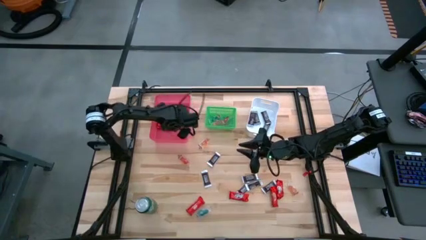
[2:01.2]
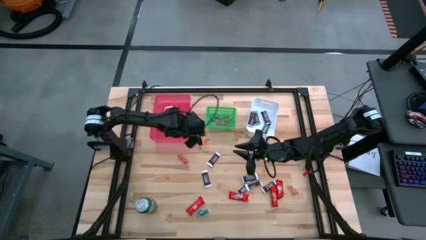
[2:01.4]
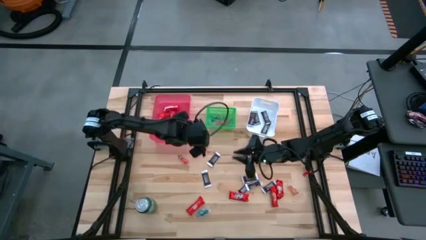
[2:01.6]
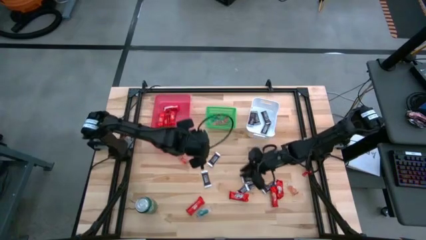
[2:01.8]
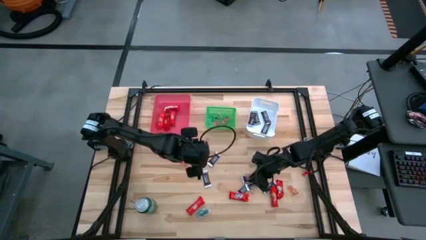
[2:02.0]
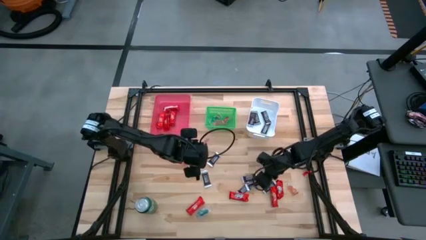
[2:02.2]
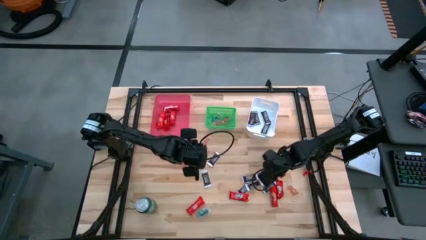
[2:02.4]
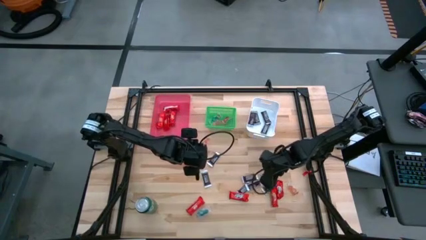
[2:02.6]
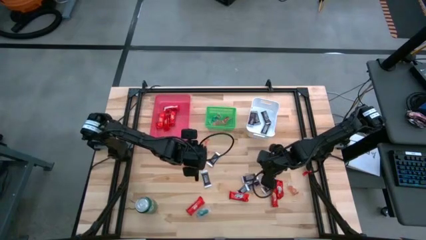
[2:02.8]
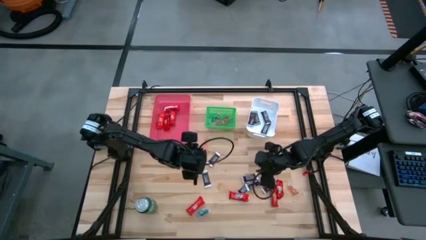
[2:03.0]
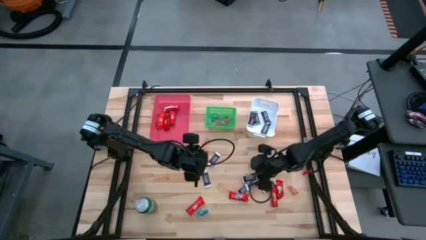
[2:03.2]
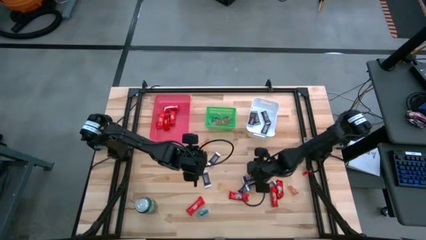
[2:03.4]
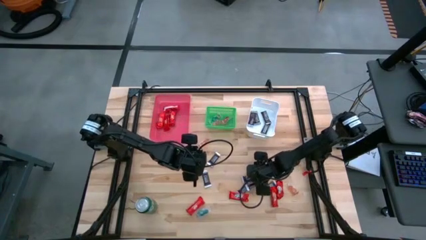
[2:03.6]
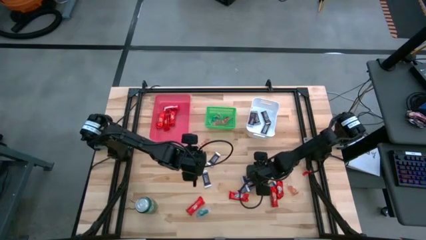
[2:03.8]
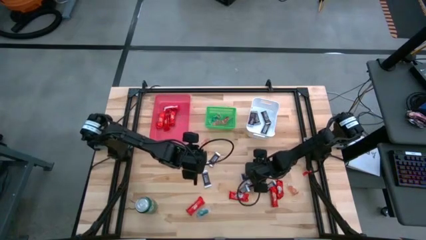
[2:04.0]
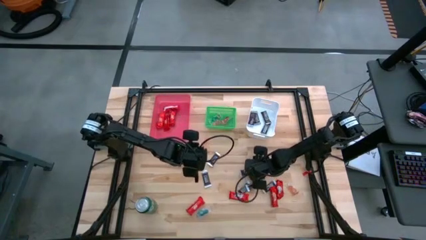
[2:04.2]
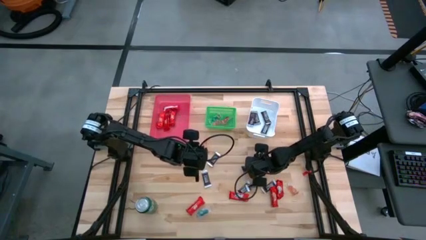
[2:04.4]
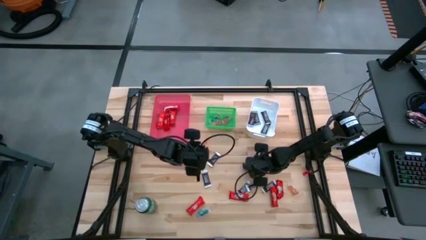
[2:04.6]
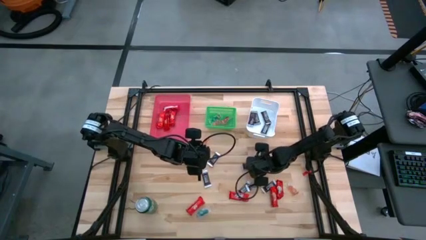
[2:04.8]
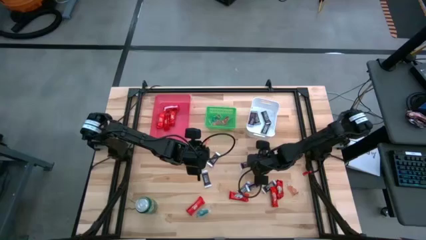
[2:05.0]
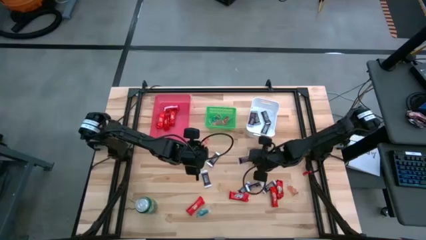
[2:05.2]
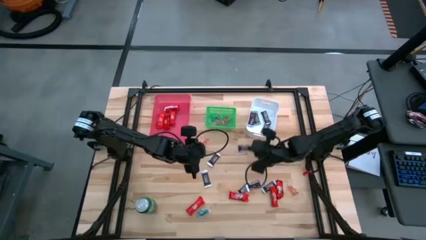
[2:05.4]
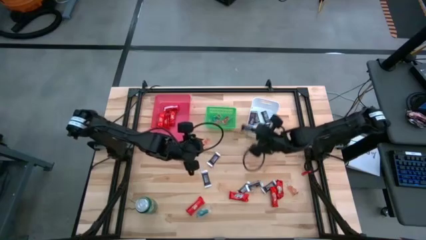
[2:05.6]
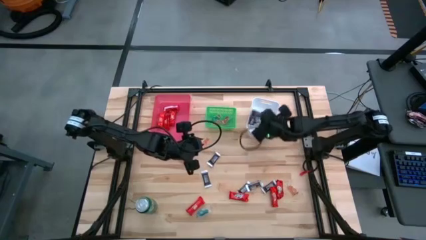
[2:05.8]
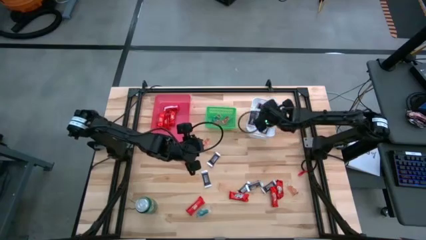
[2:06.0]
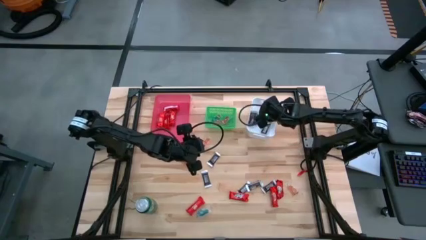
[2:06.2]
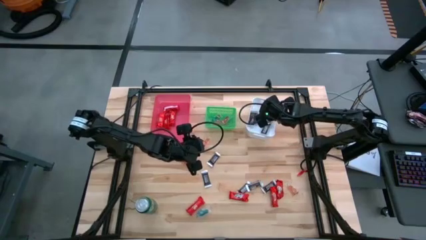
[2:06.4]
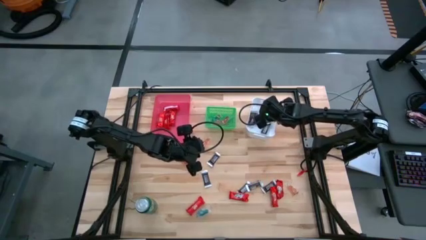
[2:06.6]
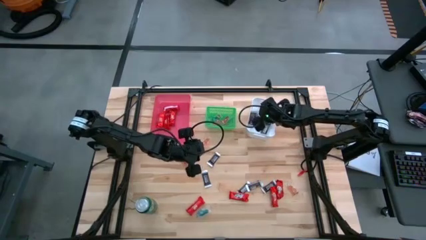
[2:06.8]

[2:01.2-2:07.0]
Task: Sort candy
Put the brown chocolate bar into the white bin

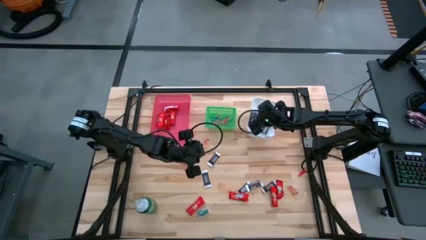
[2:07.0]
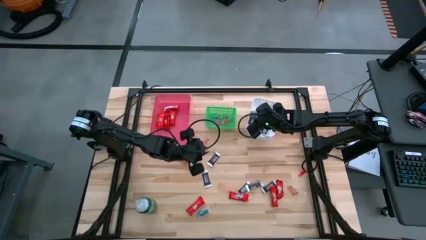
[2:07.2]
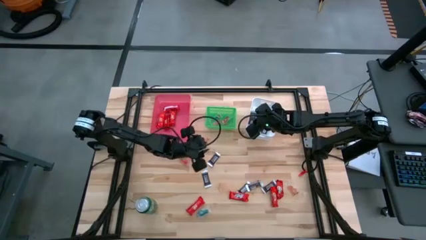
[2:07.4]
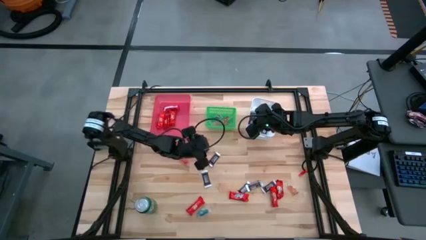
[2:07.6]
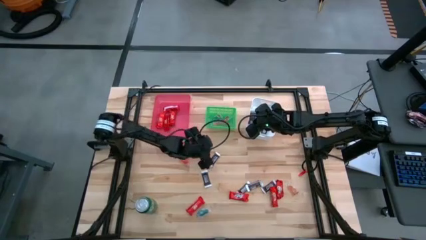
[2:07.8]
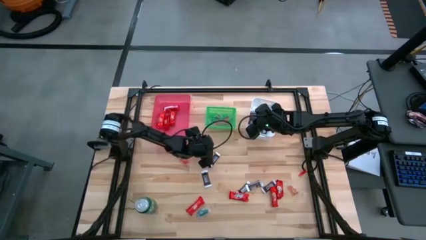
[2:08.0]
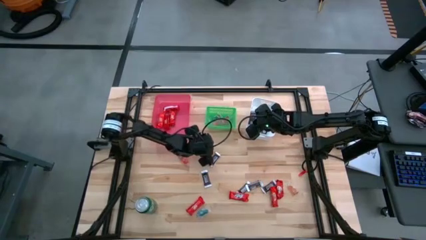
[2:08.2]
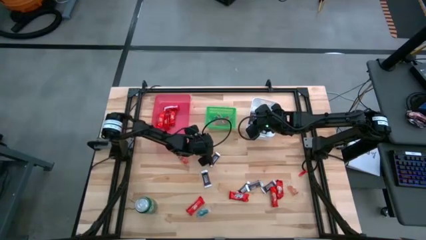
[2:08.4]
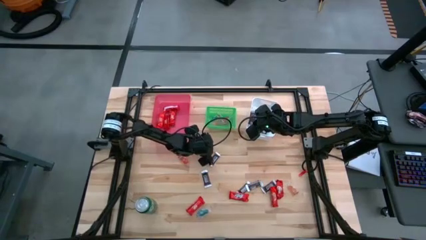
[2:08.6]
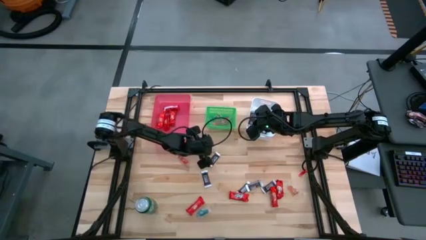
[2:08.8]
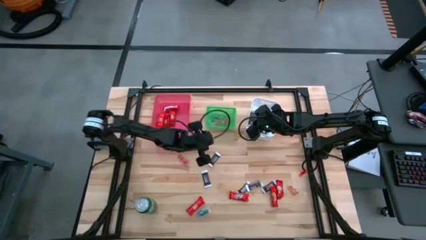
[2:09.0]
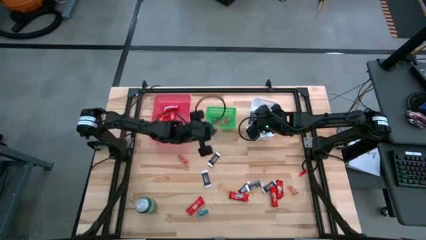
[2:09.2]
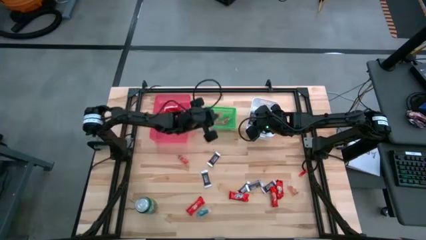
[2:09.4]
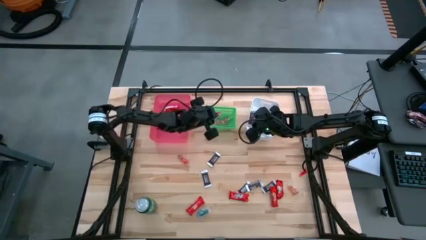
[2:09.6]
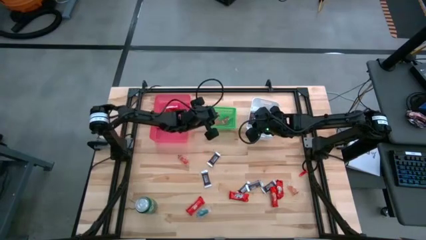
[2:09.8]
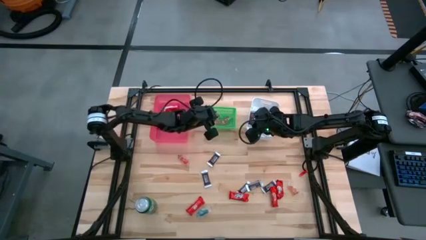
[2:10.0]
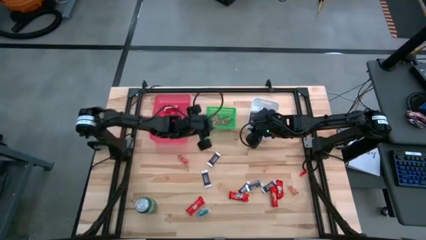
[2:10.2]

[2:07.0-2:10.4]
Put the orange gummy into the green bin

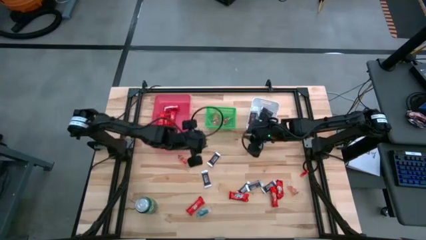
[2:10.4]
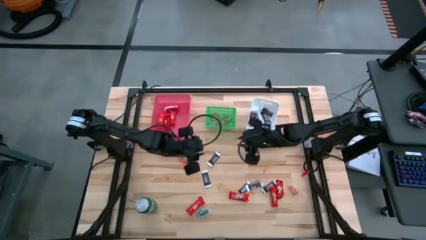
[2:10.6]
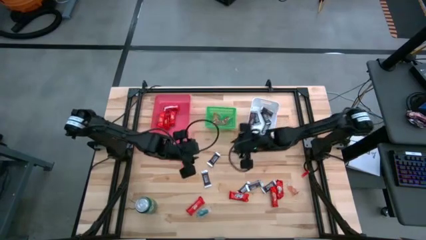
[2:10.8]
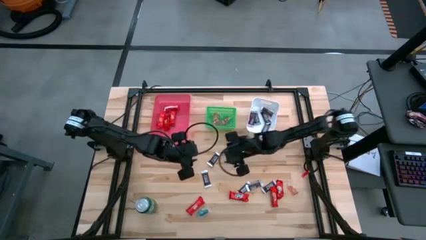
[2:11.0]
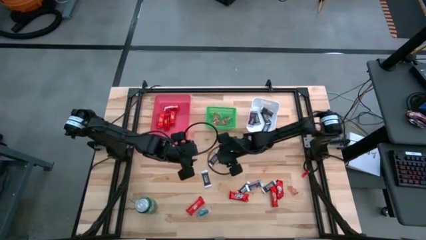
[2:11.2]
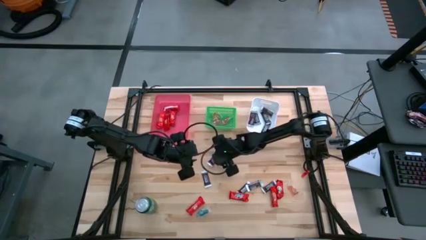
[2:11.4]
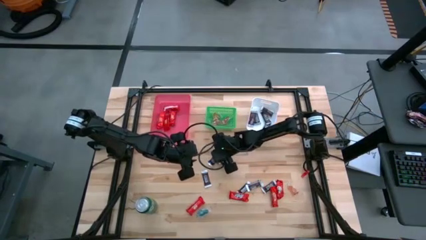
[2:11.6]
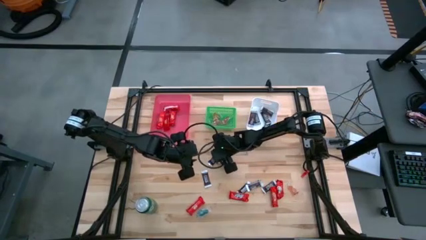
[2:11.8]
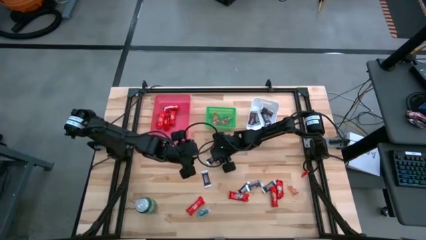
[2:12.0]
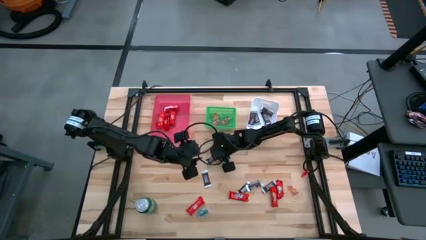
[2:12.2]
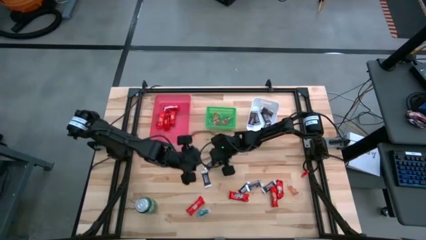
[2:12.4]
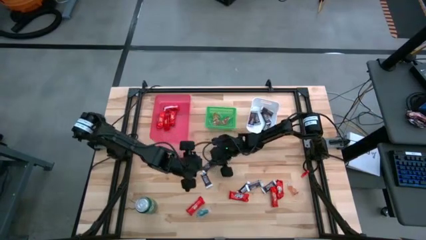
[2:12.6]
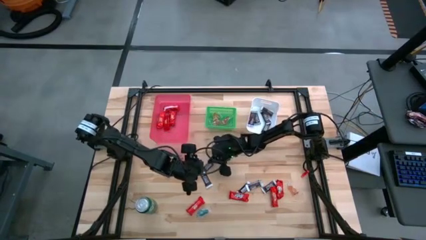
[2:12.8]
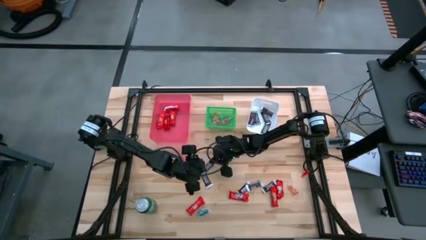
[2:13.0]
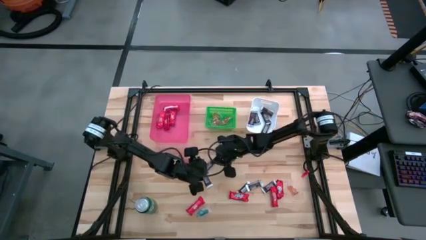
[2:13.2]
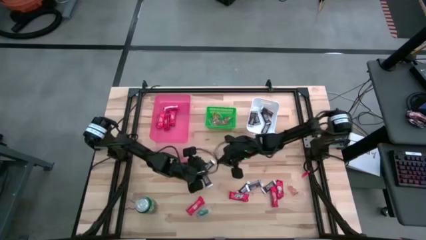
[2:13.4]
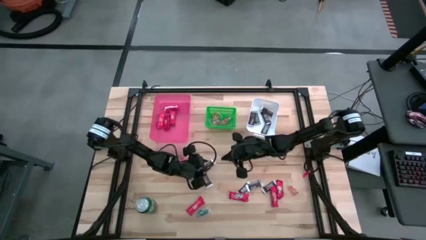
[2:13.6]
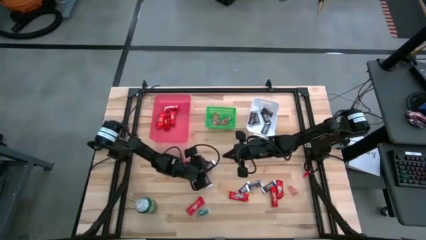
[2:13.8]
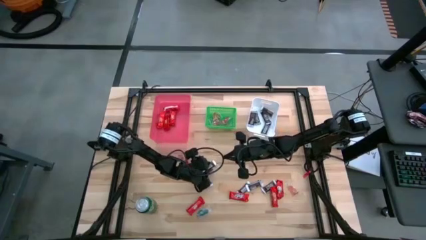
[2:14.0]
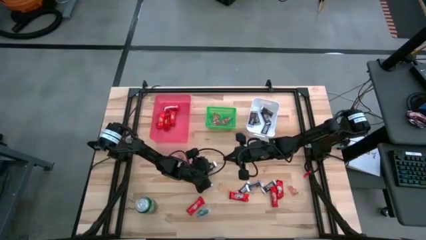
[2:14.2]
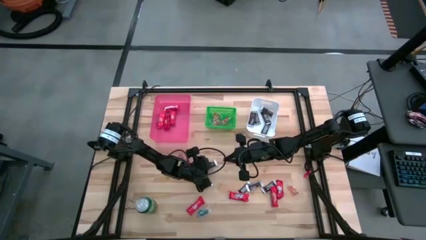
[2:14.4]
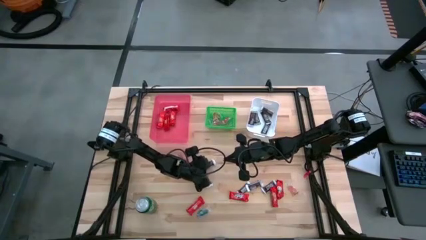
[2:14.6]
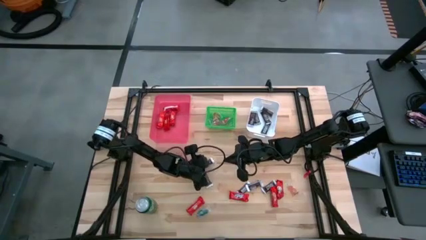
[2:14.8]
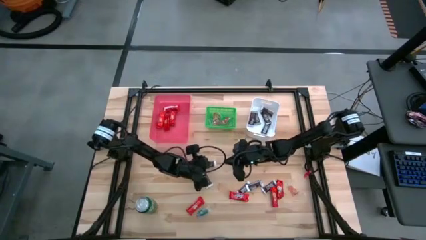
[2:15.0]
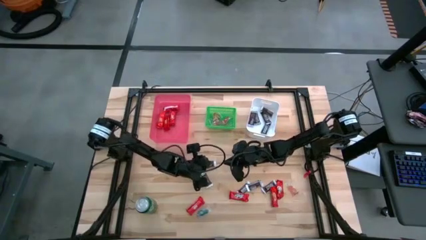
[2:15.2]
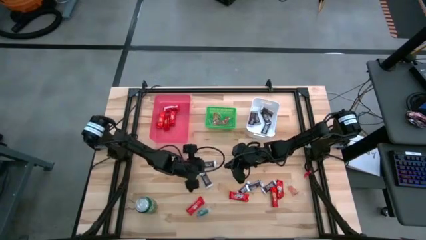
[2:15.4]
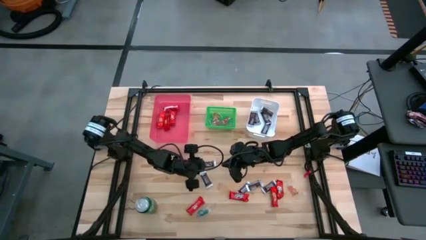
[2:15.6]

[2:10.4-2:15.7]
Put the brown chocolate bar into the white bin

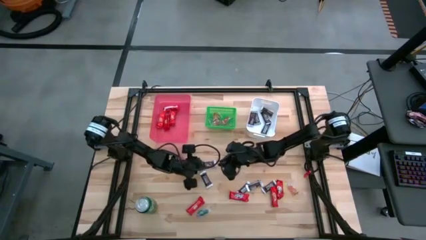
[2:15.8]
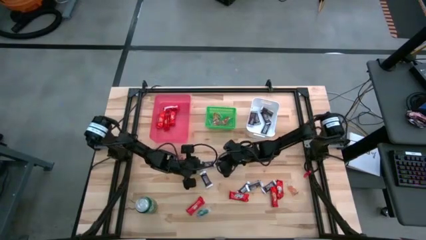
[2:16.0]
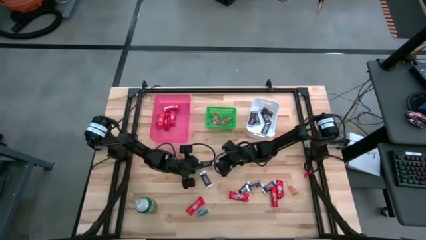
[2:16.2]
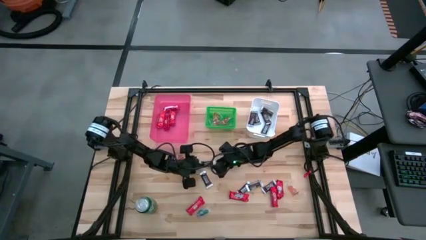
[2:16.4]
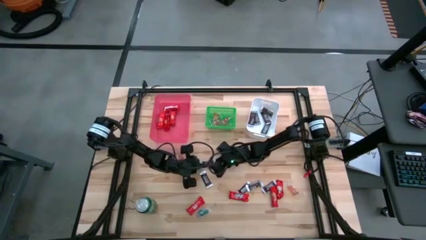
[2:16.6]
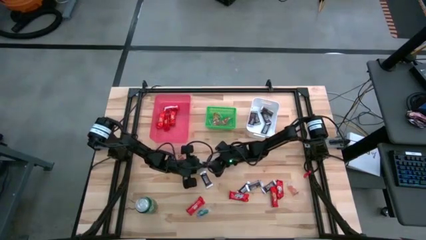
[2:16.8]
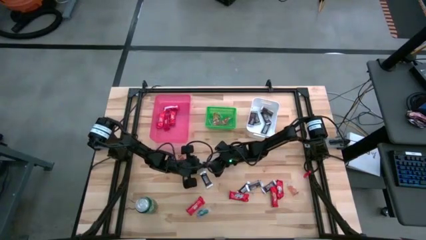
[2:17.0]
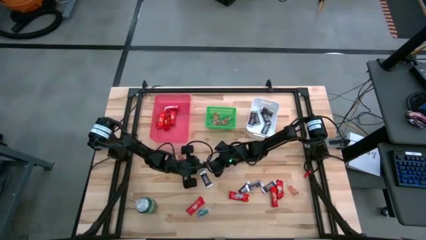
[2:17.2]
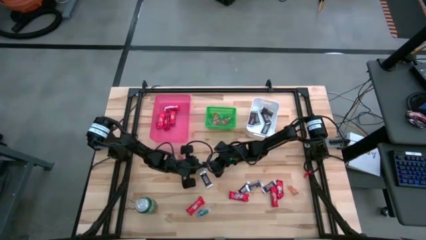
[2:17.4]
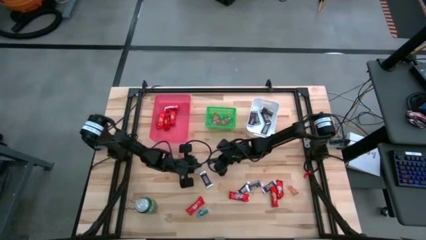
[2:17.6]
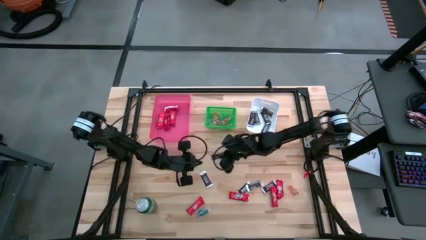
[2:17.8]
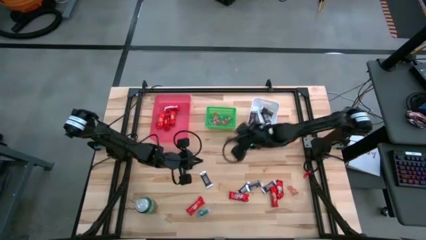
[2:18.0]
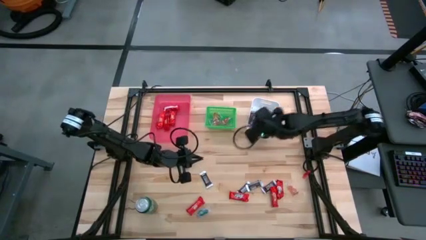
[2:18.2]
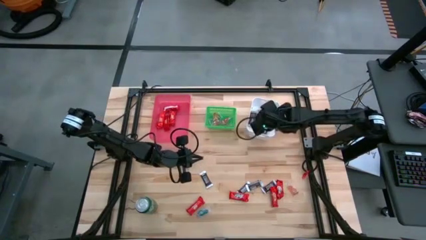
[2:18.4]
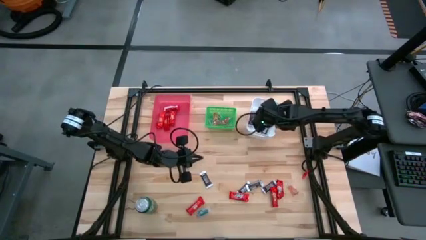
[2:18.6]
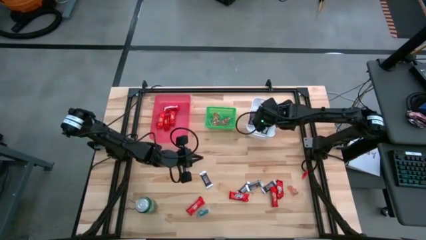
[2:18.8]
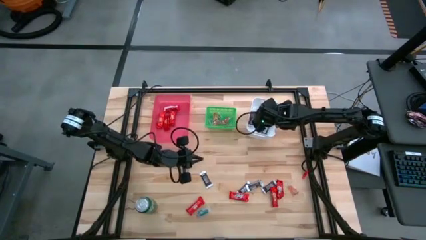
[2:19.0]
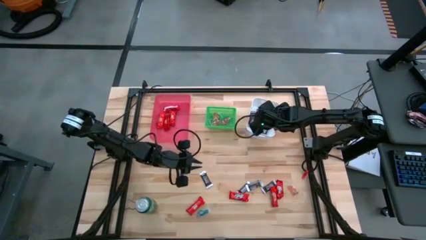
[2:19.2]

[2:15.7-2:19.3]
Put the brown chocolate bar into the white bin
